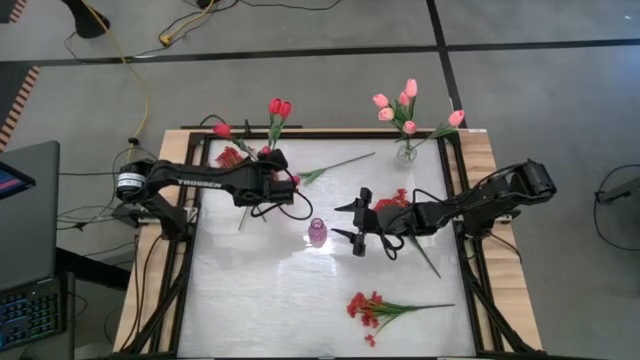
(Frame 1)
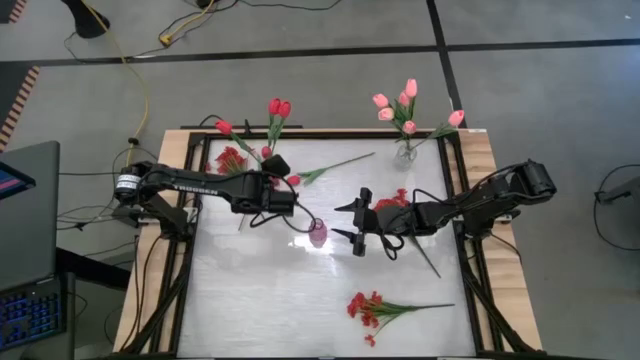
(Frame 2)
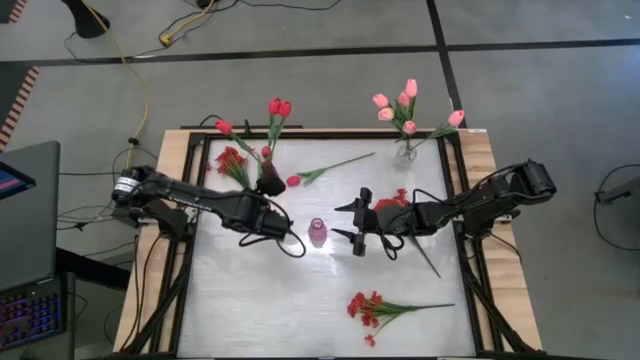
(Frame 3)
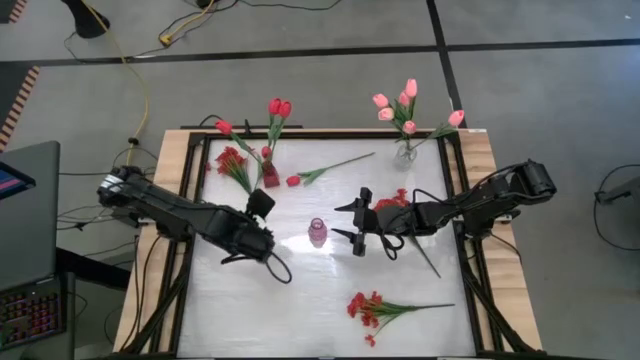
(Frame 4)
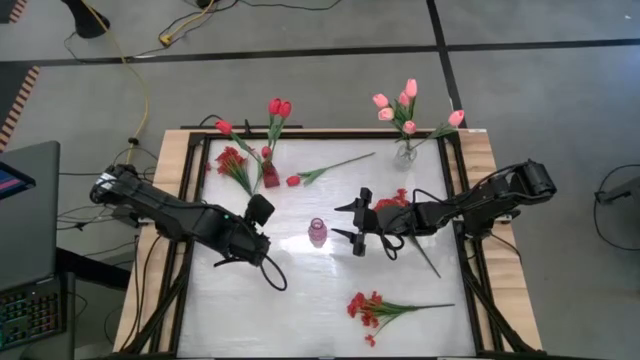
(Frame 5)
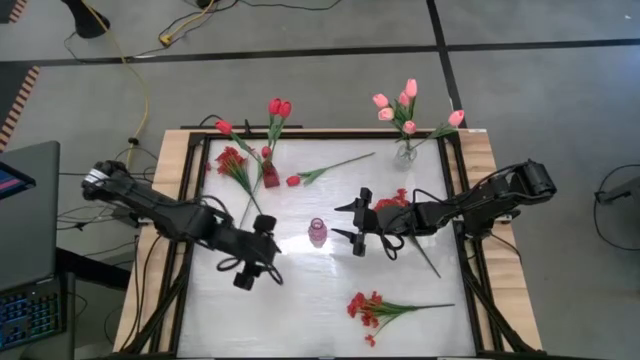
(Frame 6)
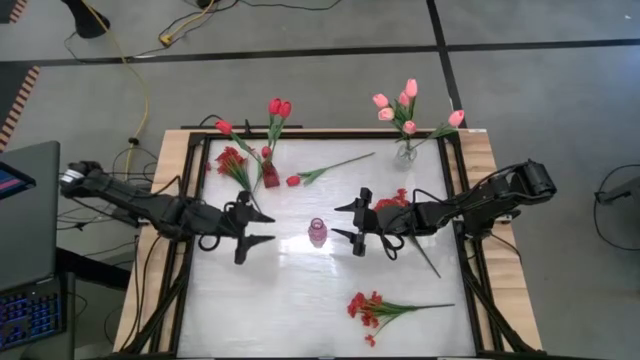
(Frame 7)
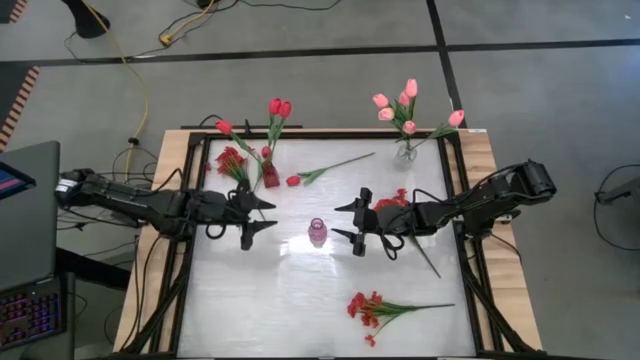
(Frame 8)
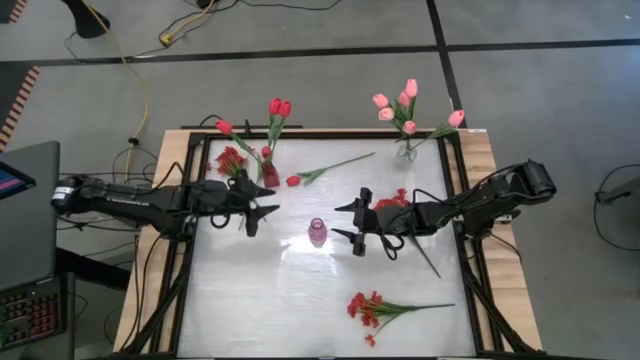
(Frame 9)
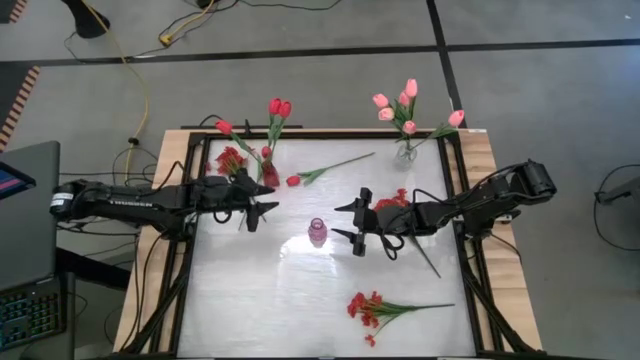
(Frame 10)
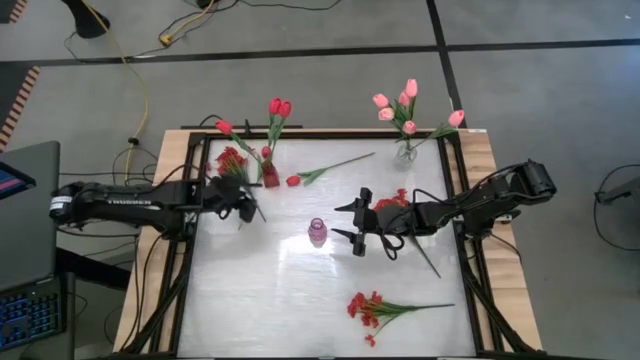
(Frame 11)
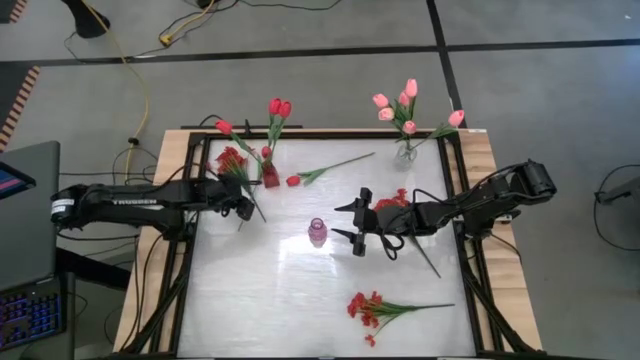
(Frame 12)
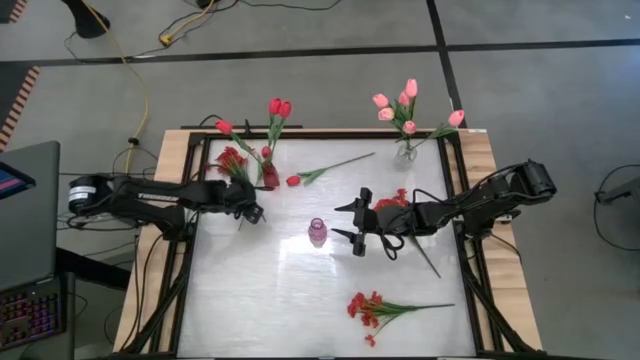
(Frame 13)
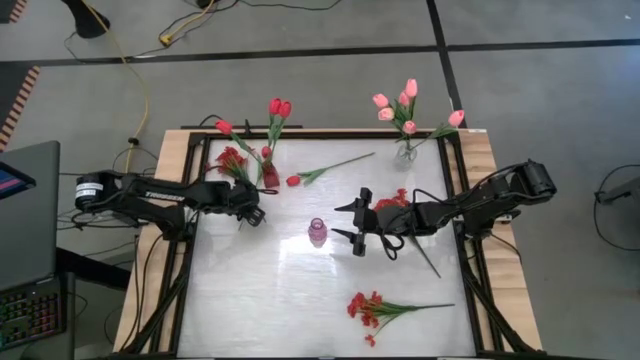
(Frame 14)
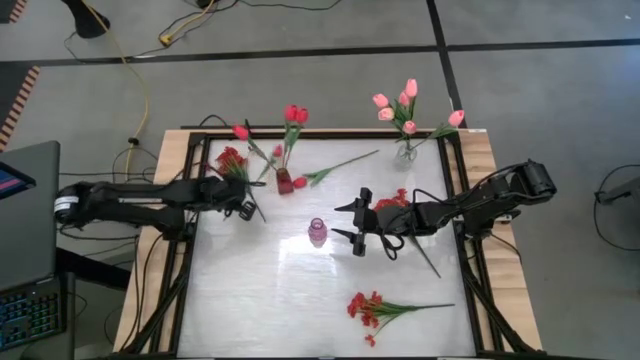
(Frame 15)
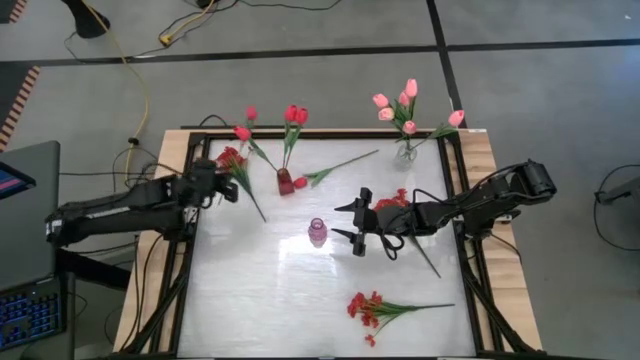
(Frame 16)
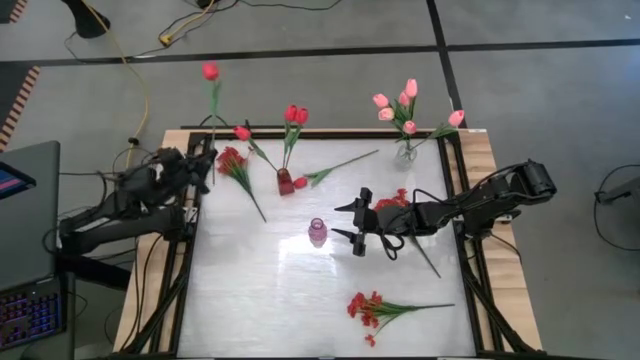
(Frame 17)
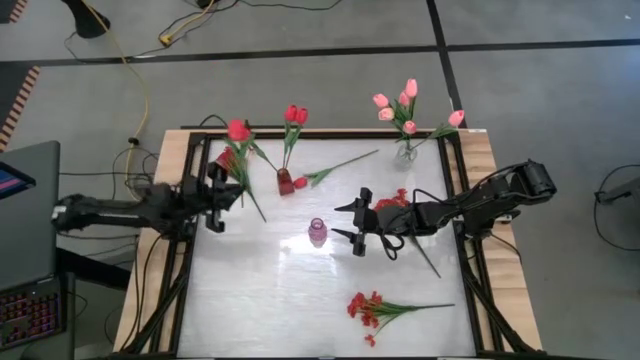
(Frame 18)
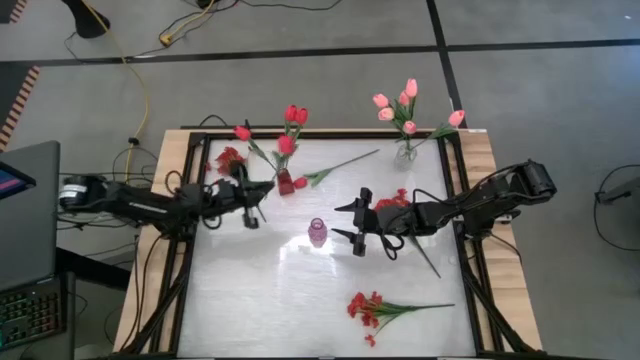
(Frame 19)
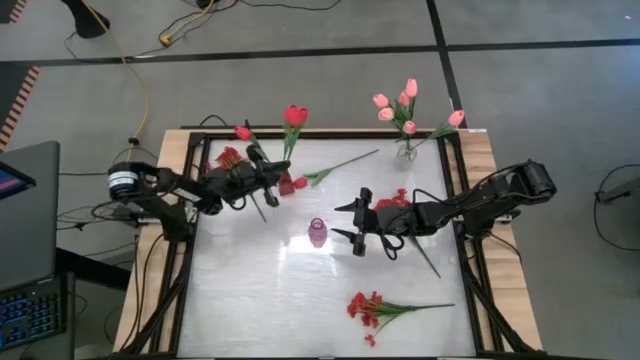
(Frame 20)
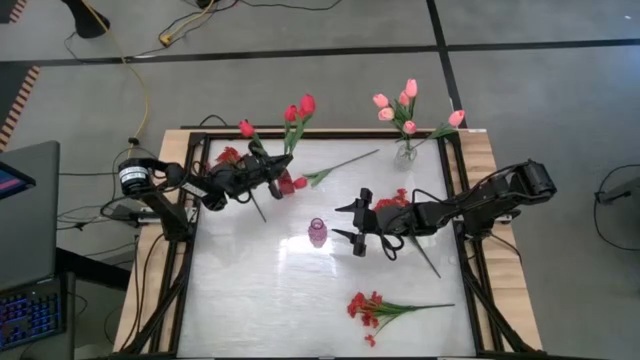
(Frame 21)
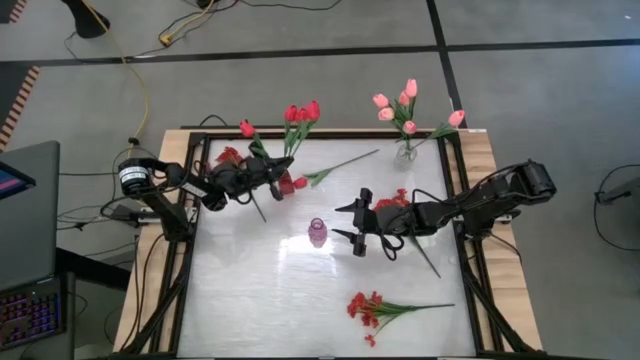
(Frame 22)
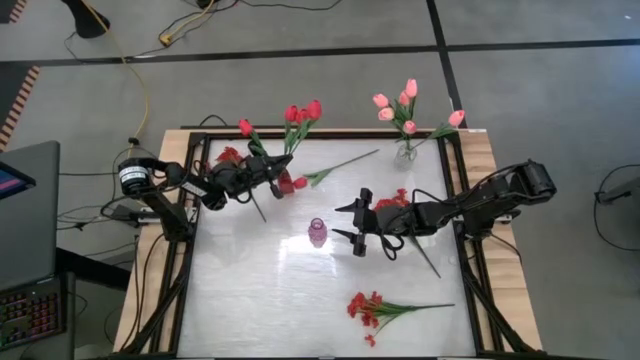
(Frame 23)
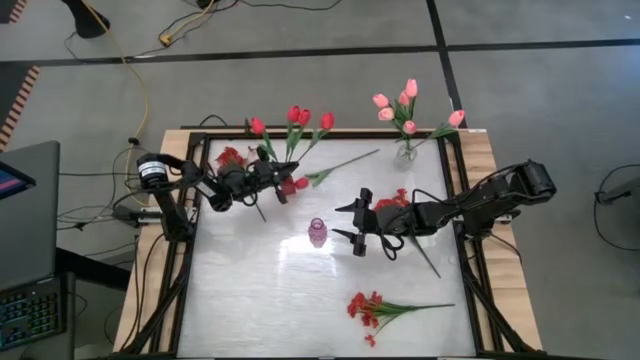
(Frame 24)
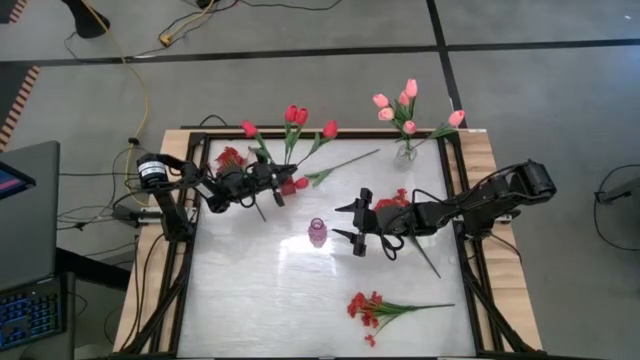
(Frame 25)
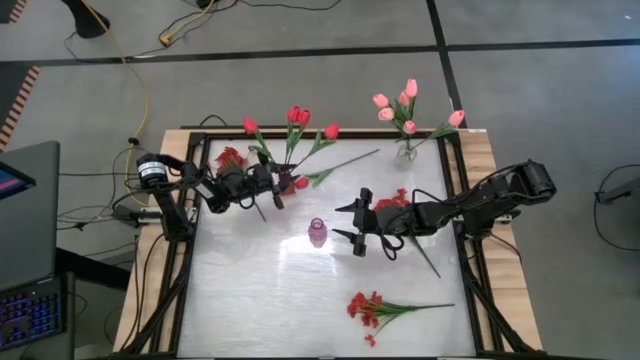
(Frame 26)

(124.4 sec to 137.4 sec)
Task: Sort flowers into vase by color
Put the red flower into the red vase

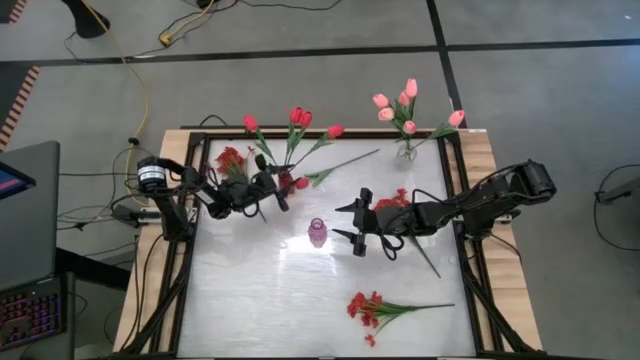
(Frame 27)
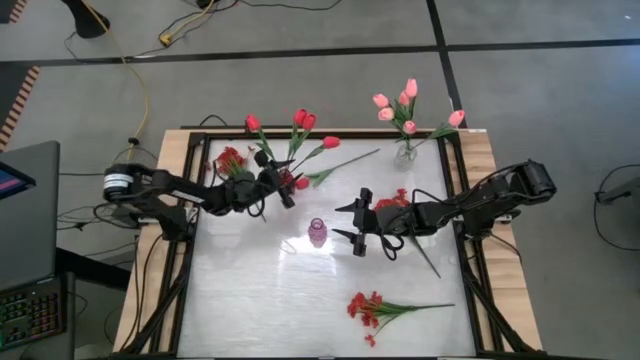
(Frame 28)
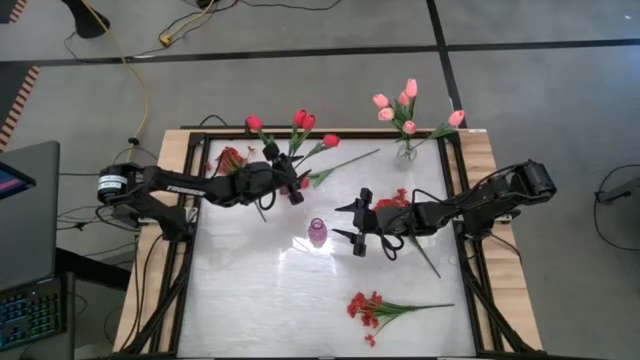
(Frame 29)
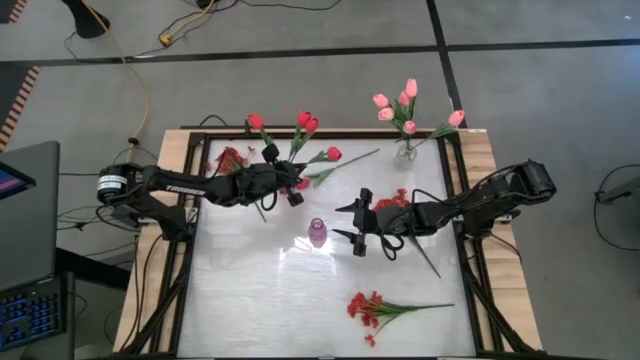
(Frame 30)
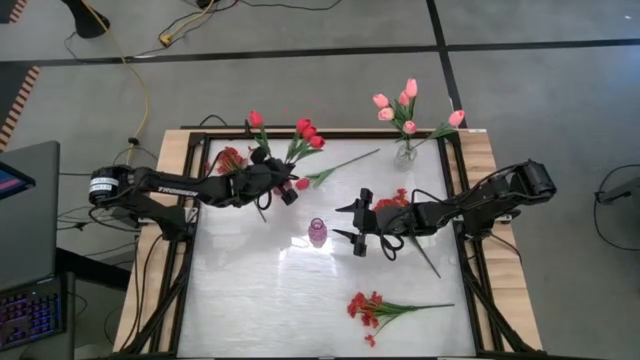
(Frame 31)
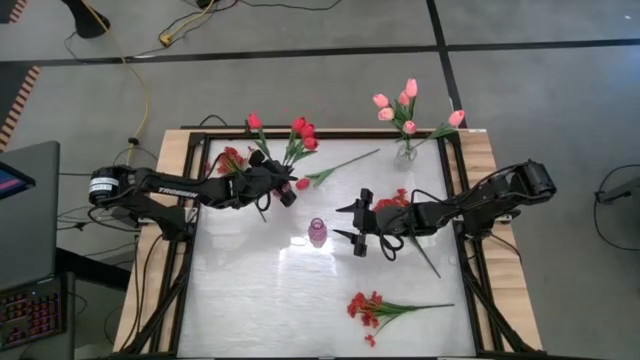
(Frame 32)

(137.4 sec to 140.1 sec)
Put the red flower into the red vase

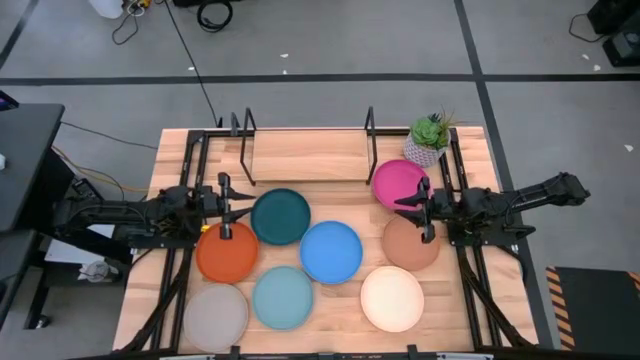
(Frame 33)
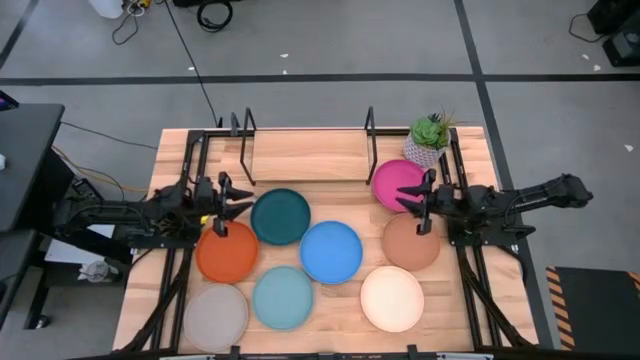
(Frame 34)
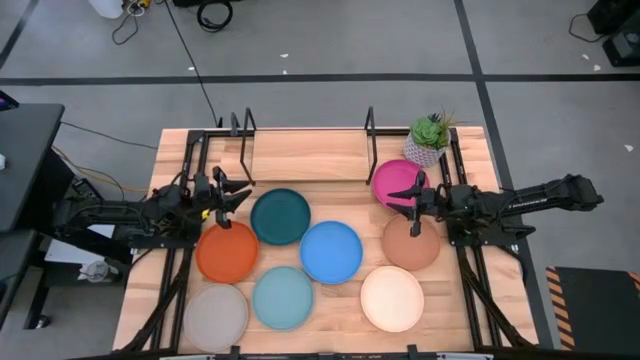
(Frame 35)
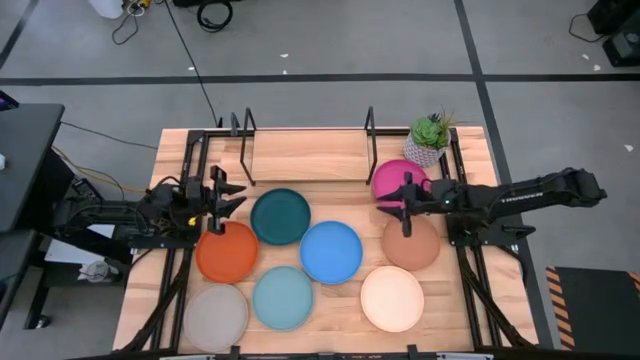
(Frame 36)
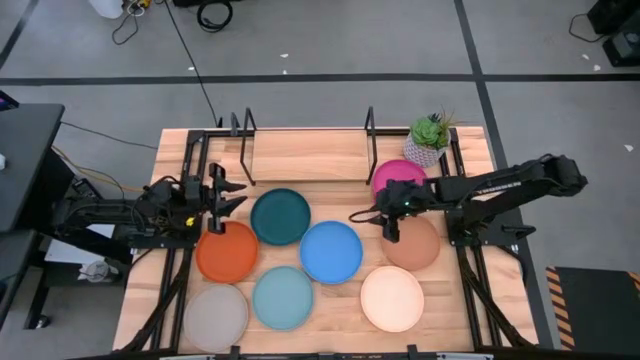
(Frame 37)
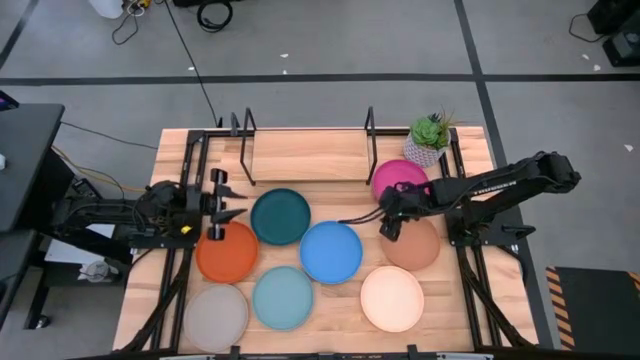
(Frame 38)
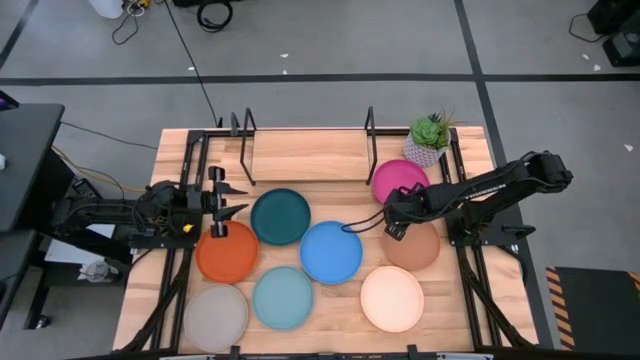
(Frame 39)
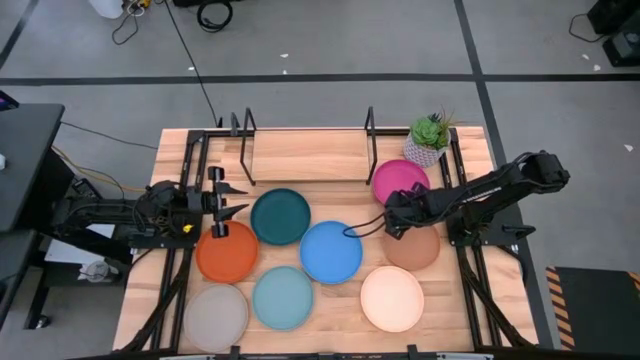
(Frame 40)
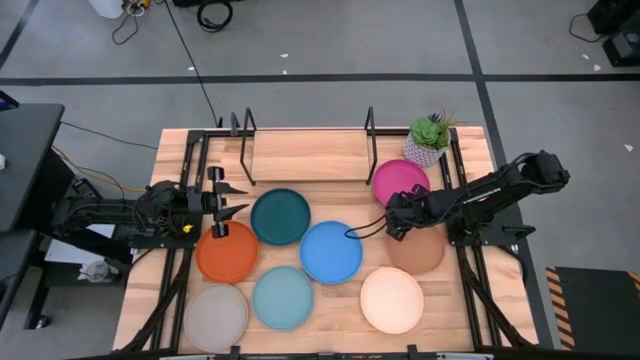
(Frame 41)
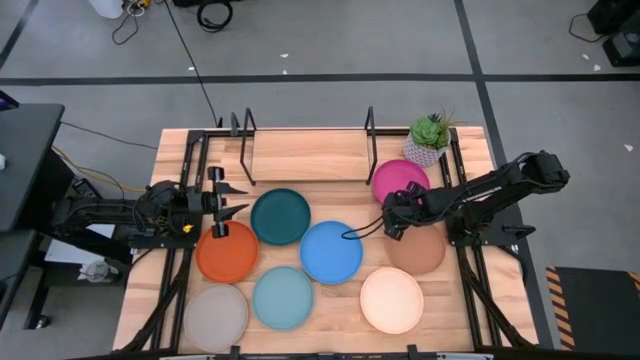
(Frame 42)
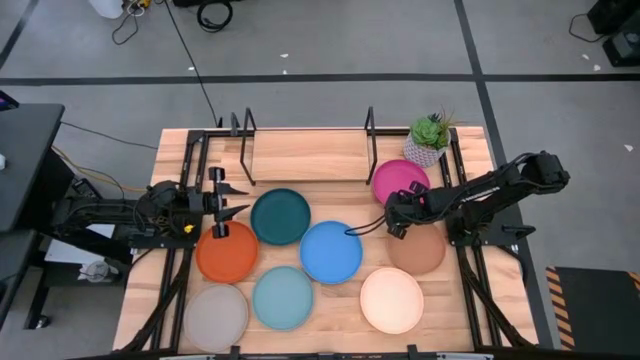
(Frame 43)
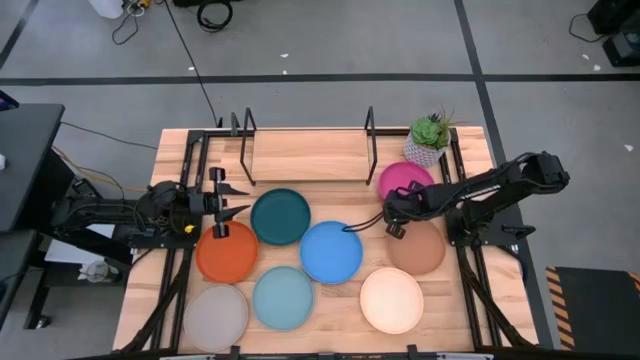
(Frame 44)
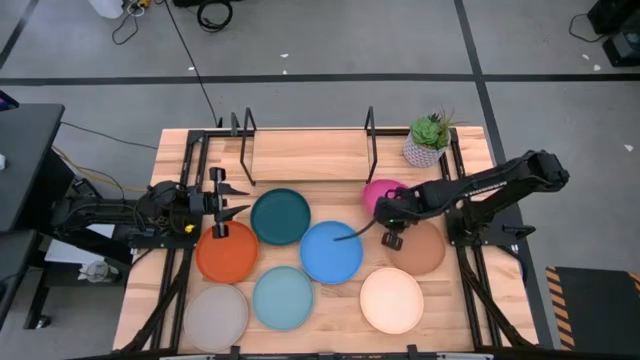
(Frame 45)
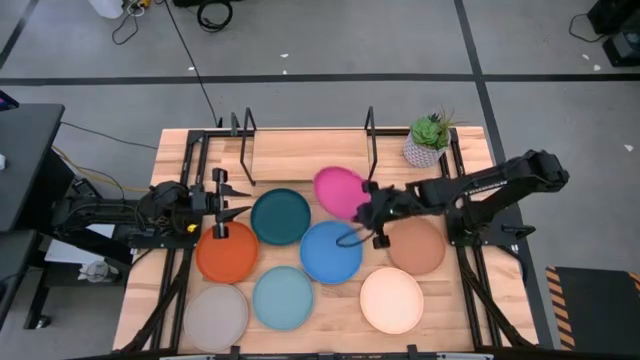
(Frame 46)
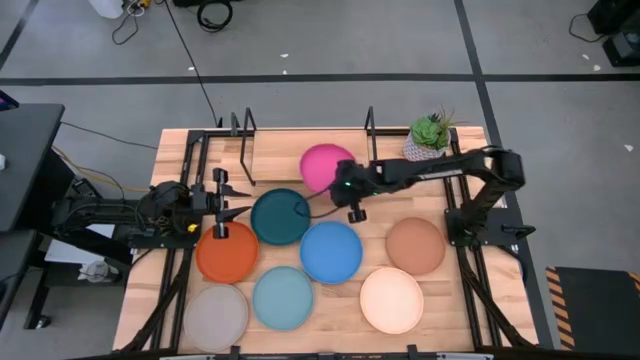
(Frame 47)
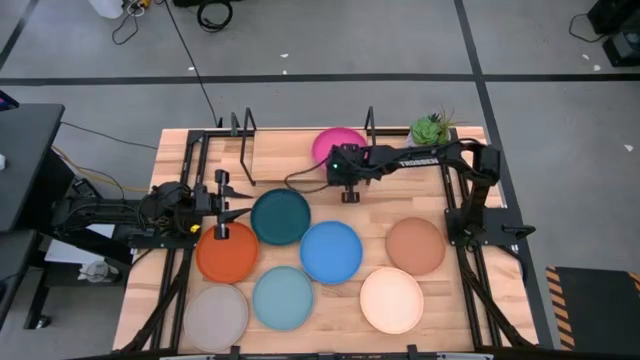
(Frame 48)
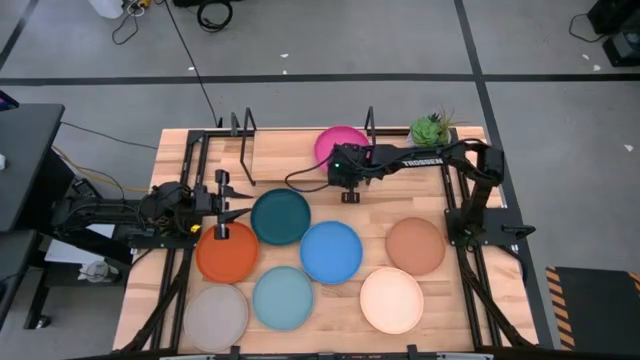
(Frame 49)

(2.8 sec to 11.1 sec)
Task: Place and stack plates onto a shelf
Put the pink plate on the shelf
